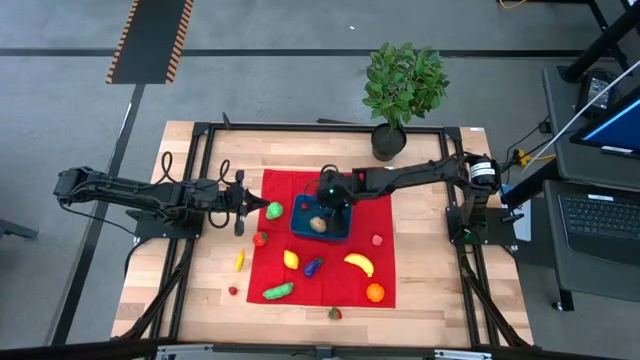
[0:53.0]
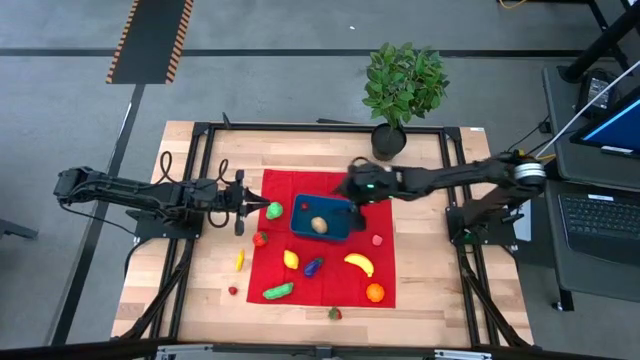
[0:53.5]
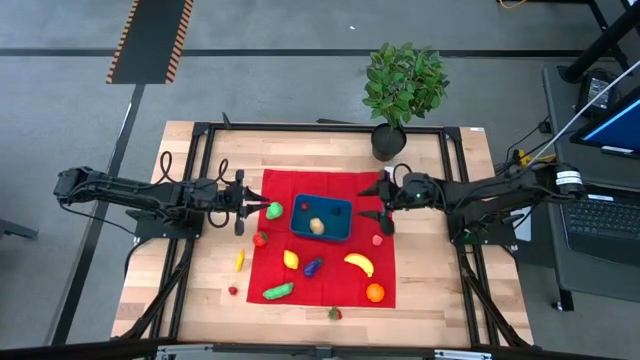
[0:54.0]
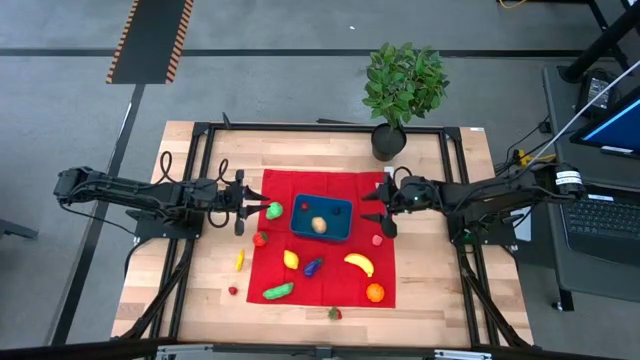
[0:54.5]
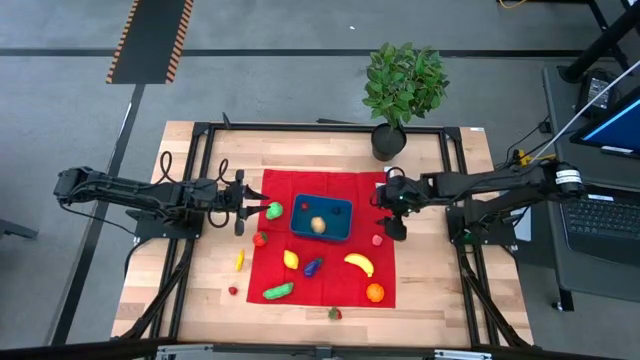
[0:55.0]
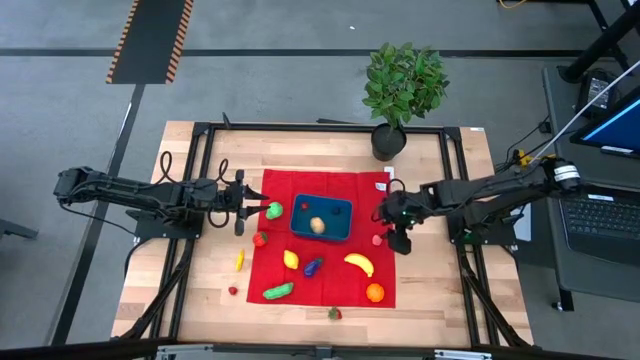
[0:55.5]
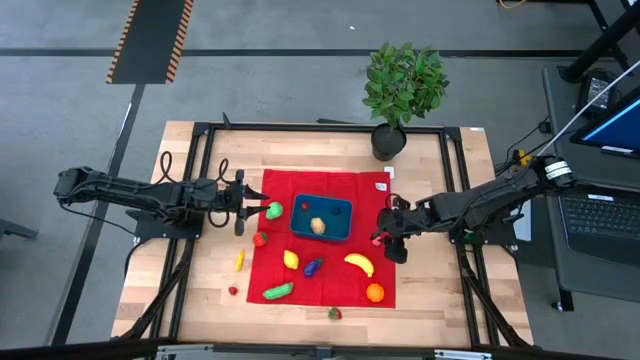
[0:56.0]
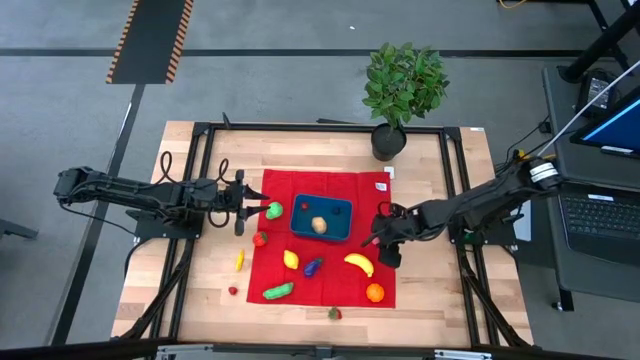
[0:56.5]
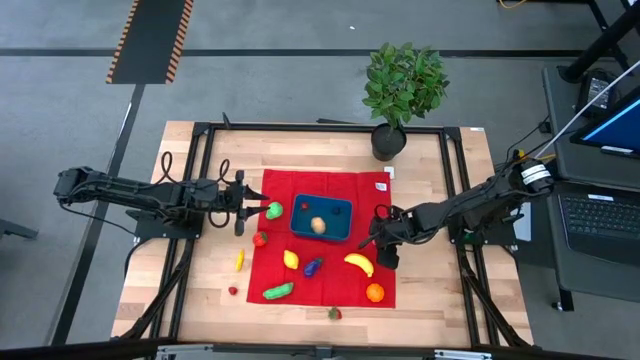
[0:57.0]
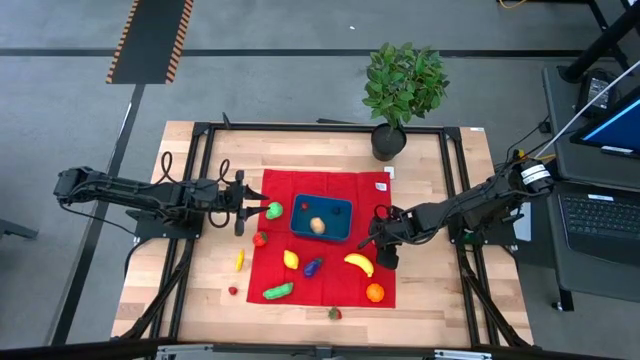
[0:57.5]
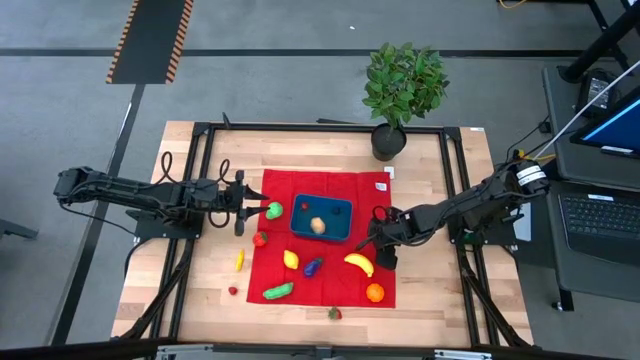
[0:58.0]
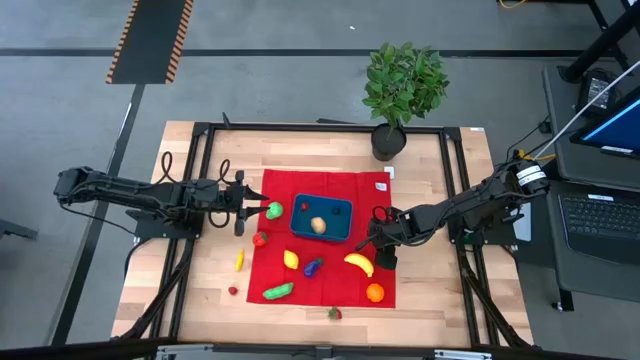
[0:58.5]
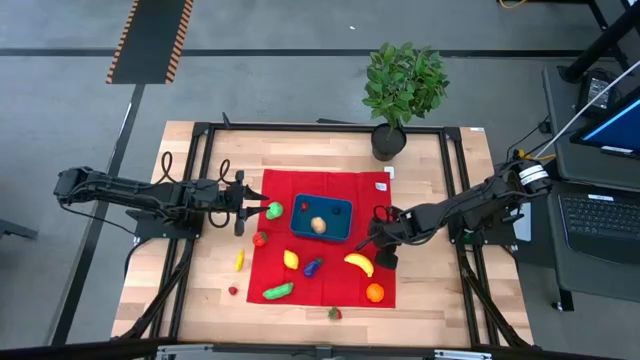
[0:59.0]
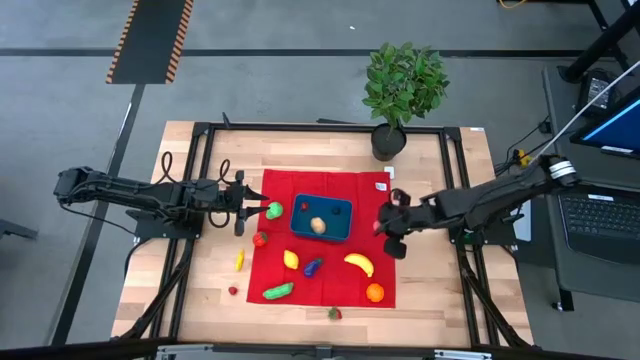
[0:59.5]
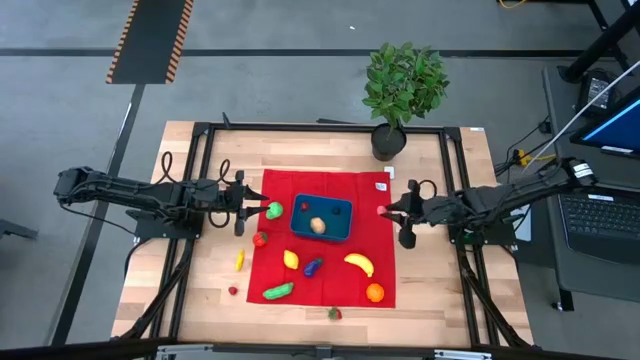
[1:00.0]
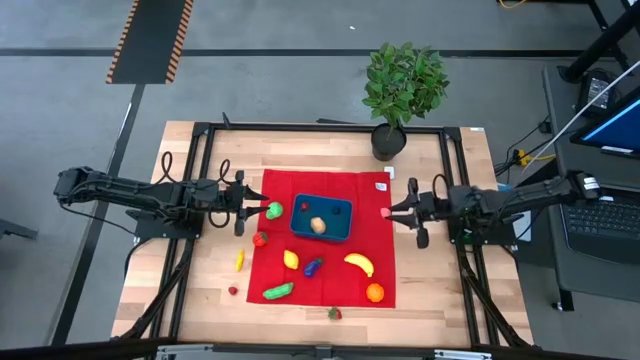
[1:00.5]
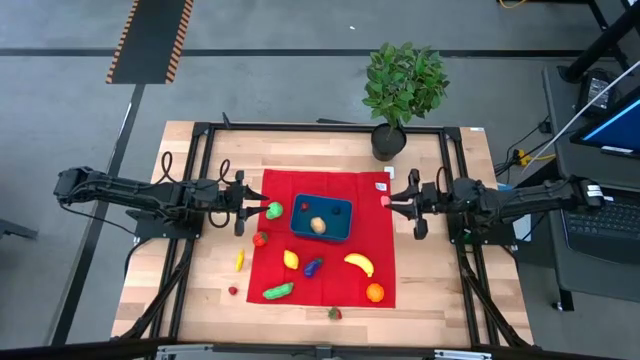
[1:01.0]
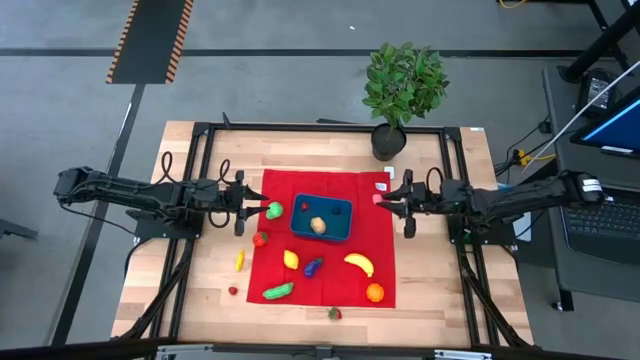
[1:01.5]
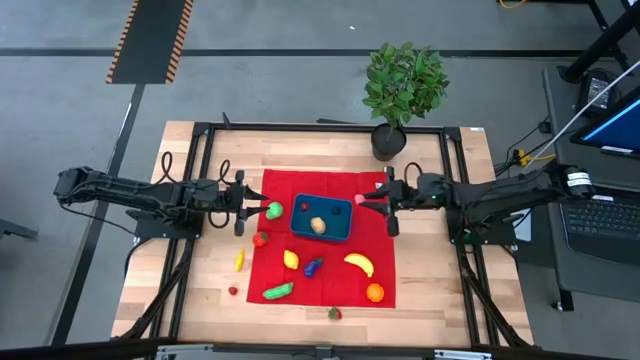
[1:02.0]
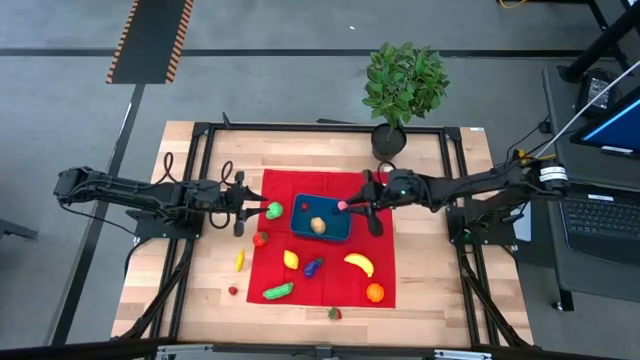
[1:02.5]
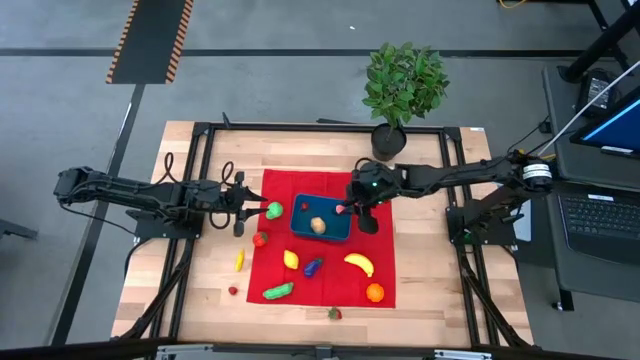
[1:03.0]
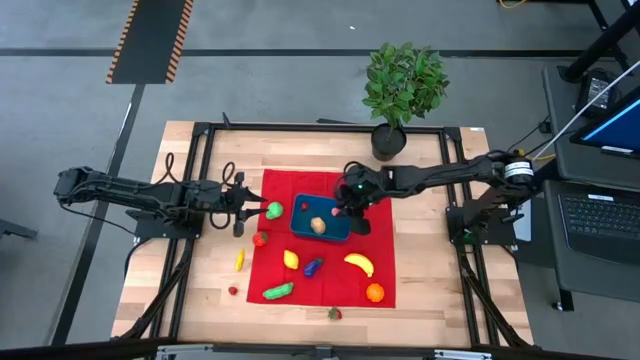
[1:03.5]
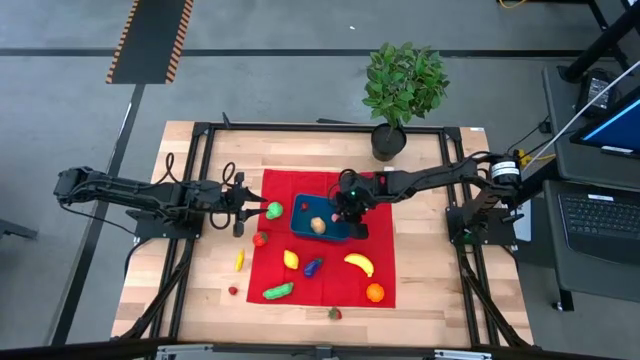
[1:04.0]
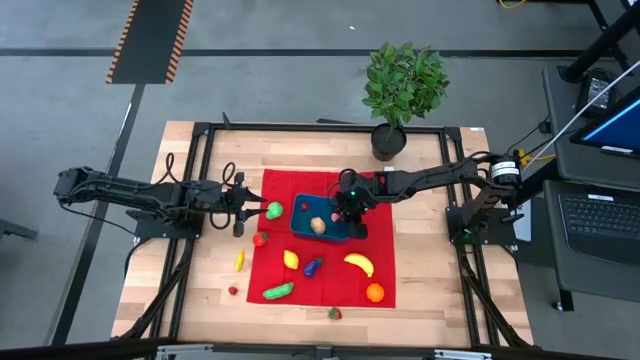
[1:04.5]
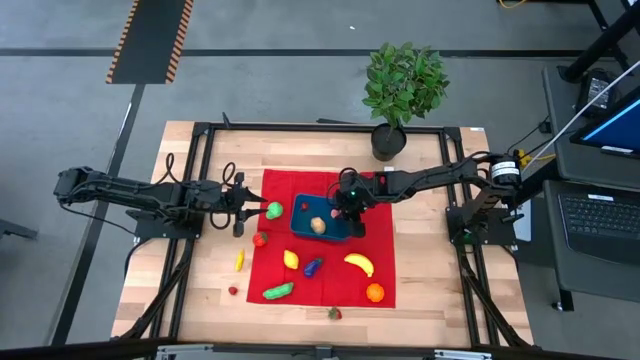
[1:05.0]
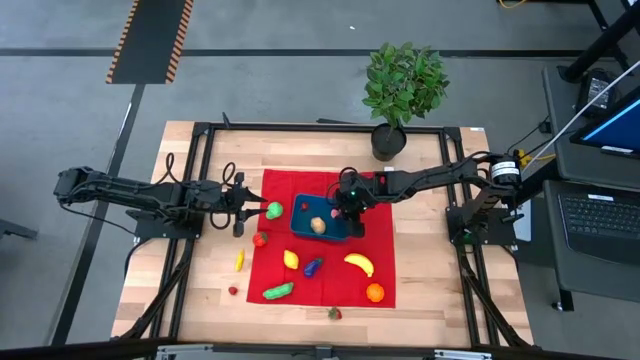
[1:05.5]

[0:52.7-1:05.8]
Task: Pick and placing Produce into tupperware
Put the pink peach into the blue bin

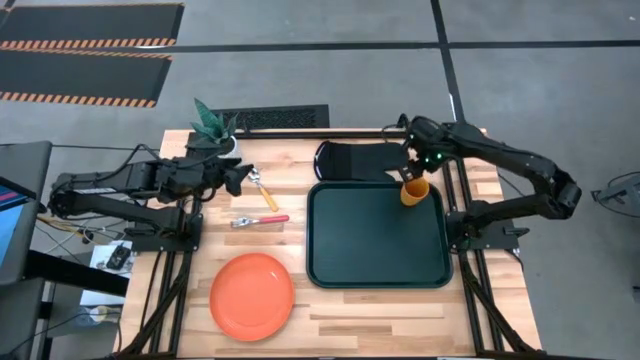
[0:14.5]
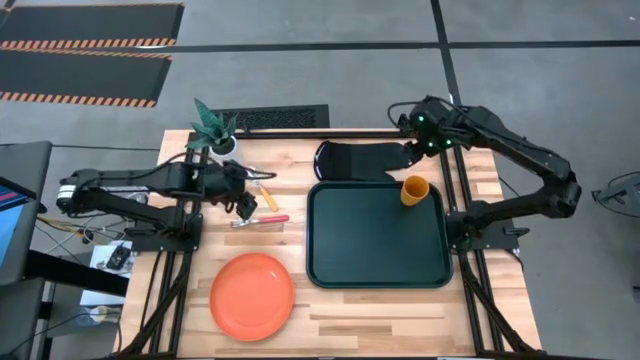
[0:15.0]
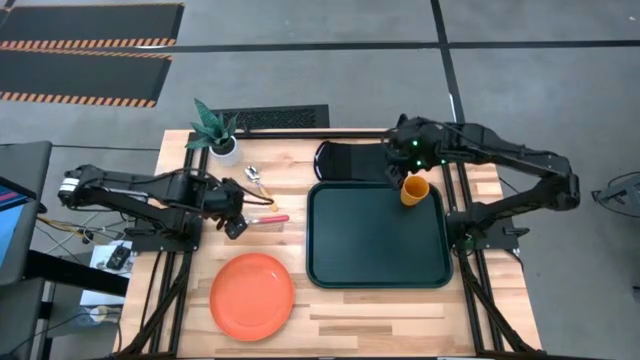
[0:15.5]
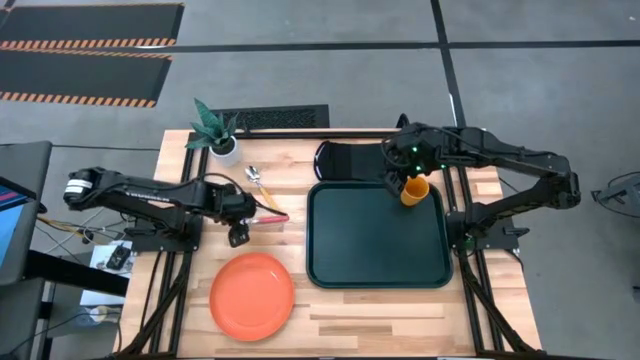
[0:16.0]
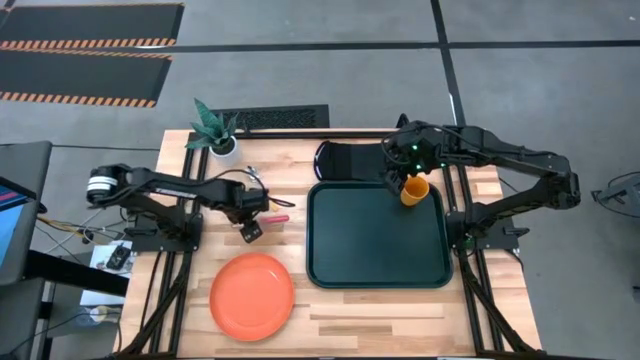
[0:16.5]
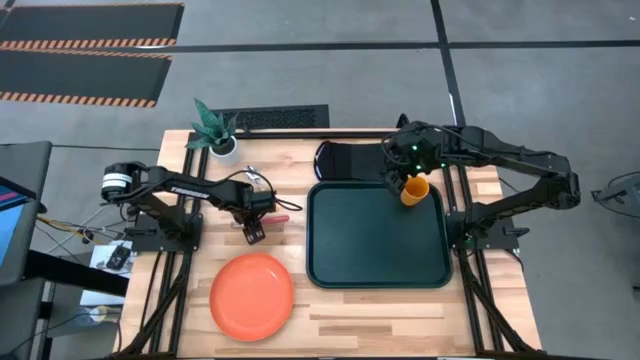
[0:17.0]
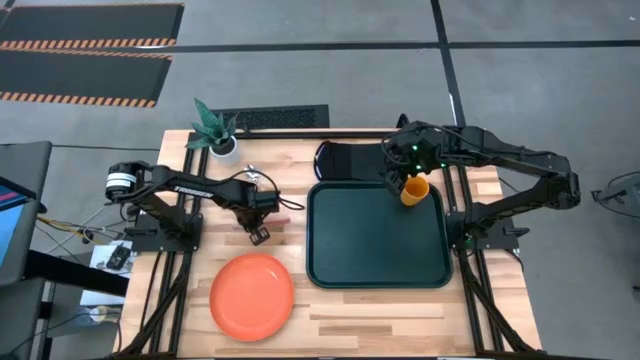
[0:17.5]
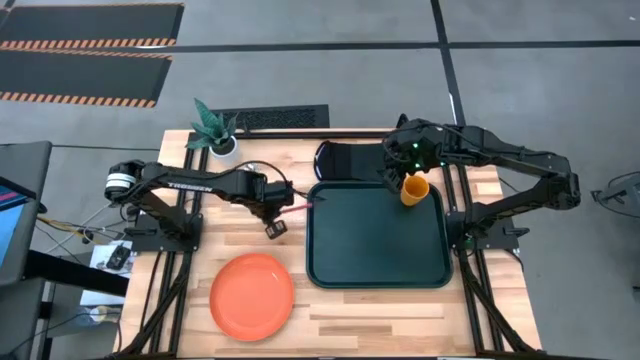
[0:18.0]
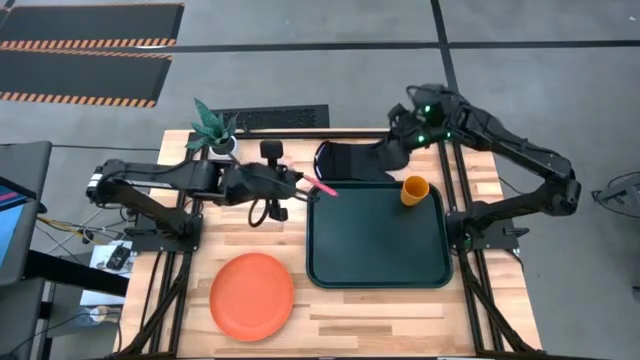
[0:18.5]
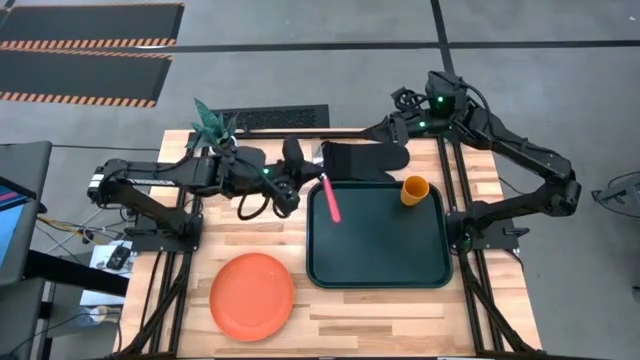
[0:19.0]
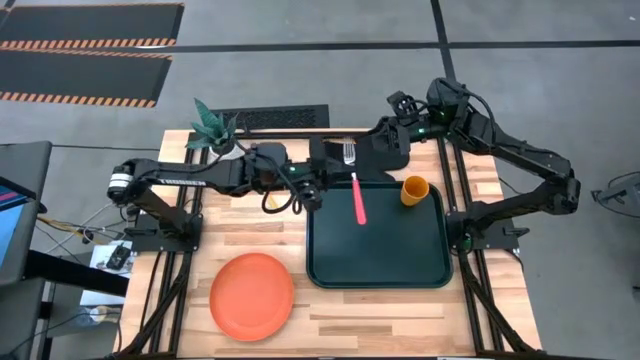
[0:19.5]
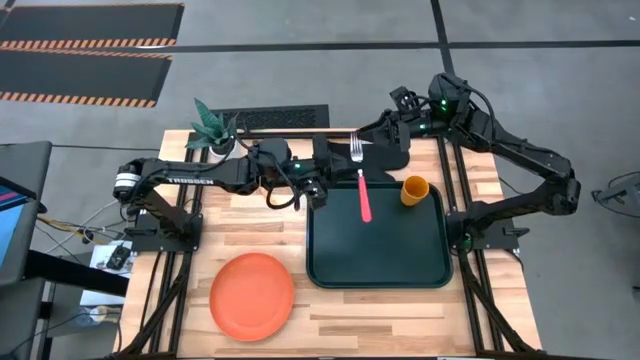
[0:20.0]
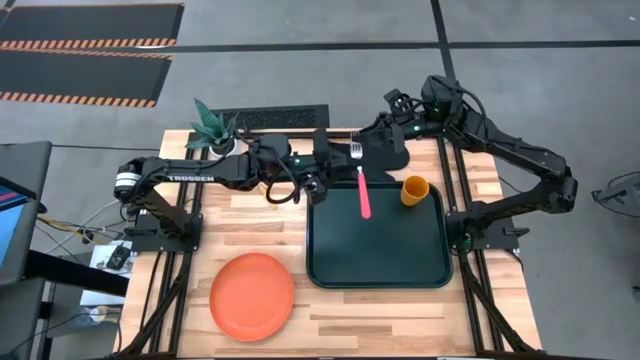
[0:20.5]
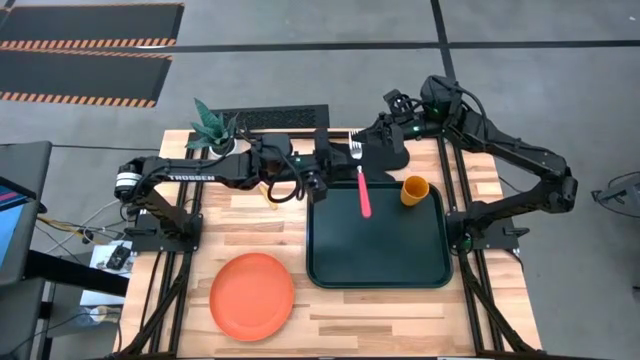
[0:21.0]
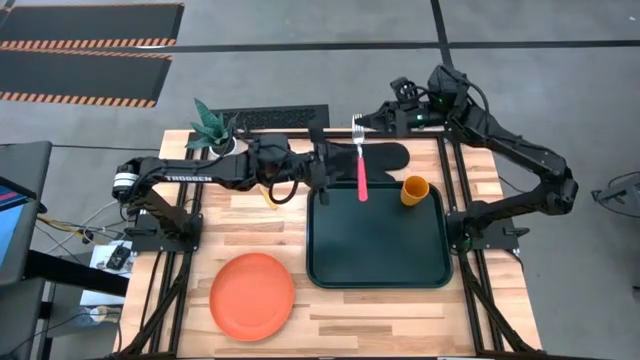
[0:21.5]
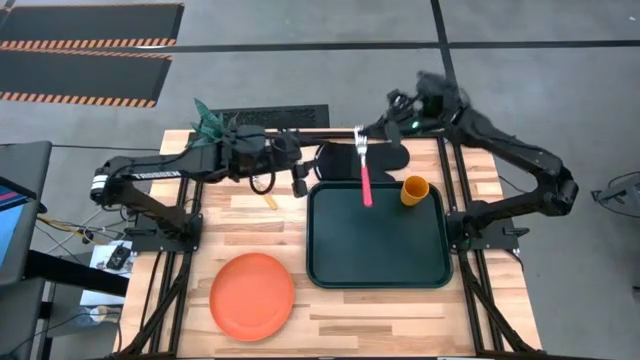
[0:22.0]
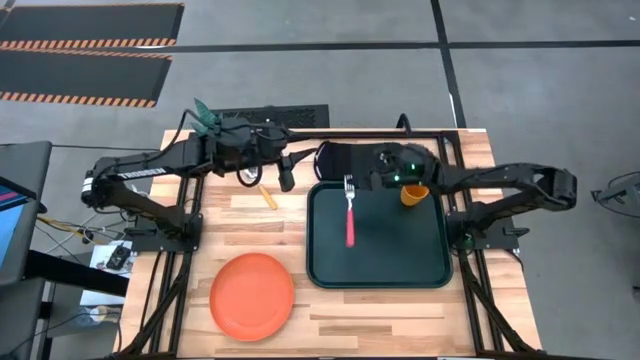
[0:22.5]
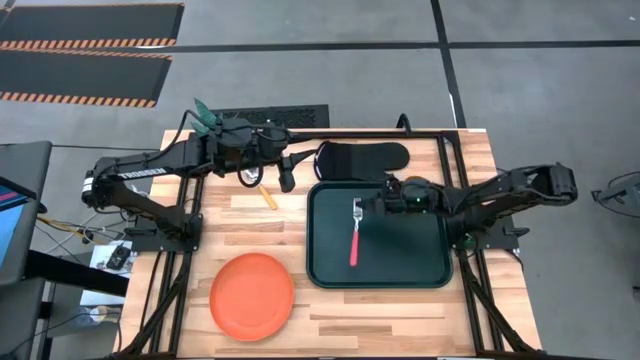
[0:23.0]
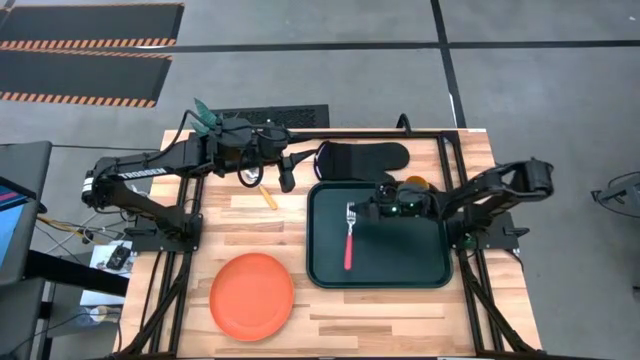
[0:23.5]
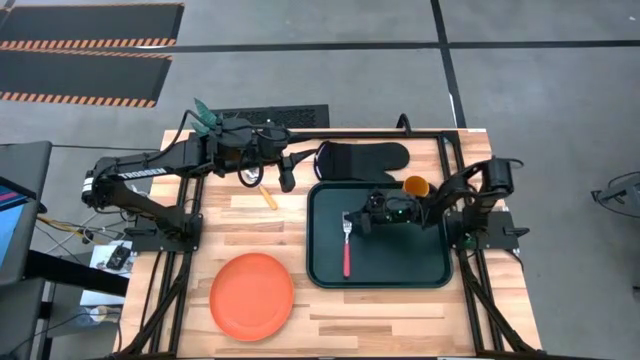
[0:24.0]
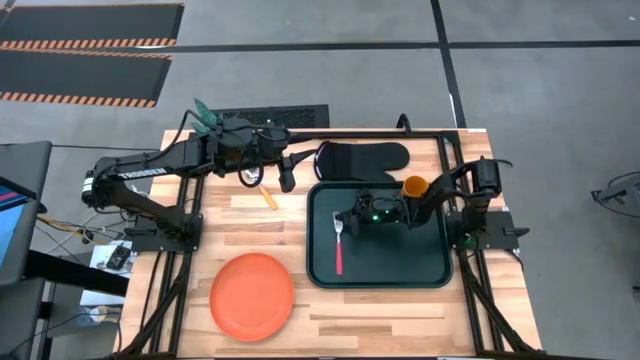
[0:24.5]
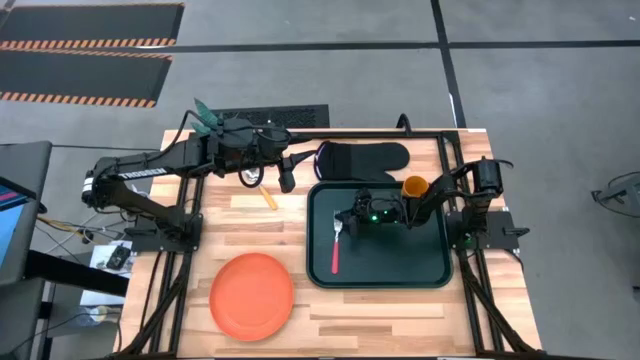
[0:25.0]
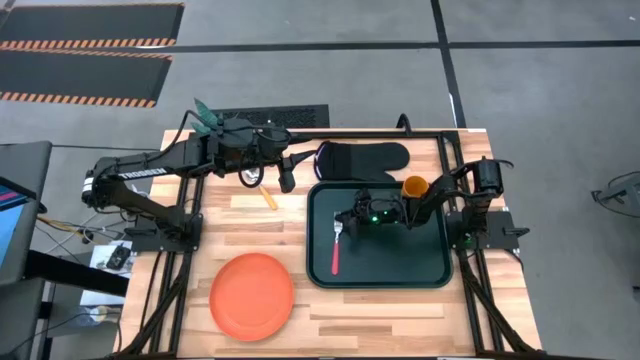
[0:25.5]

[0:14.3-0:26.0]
Task: Pick and place plate/cup/fork/spoon on tray
Put the pink fork in the middle left of the green serving tray
